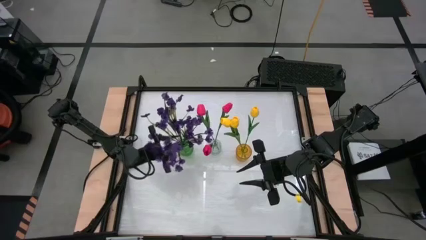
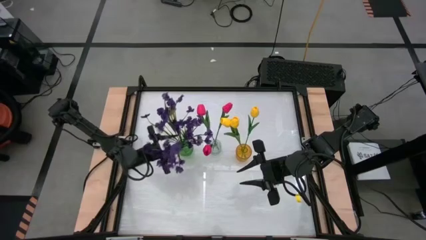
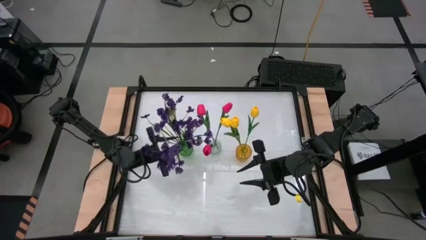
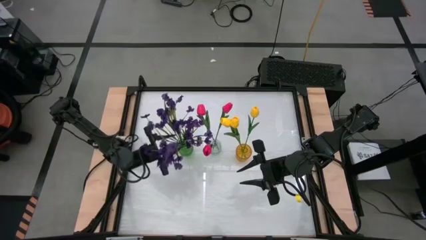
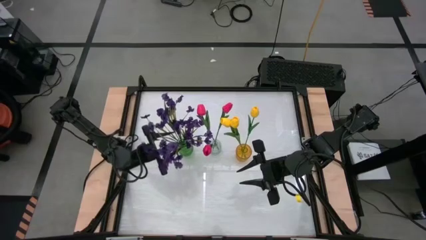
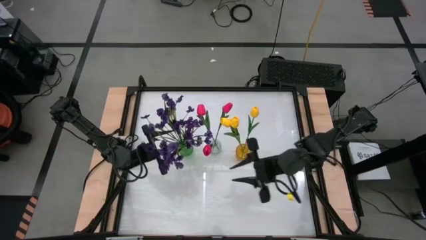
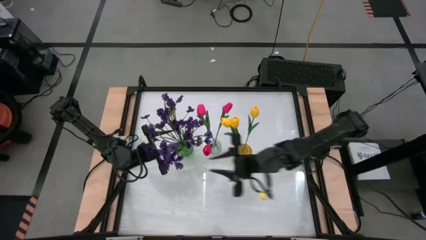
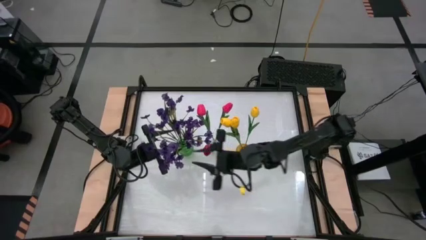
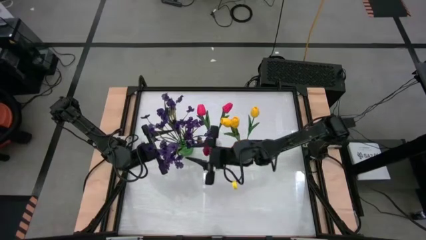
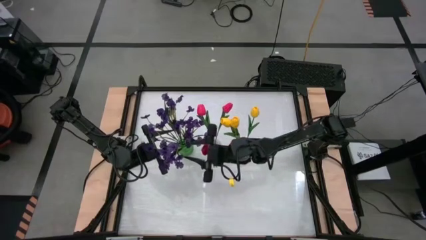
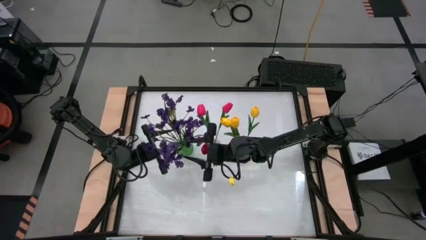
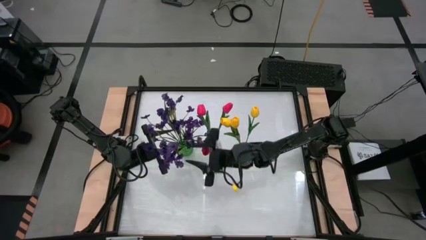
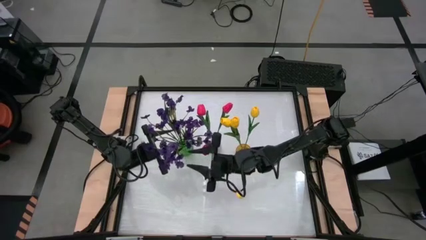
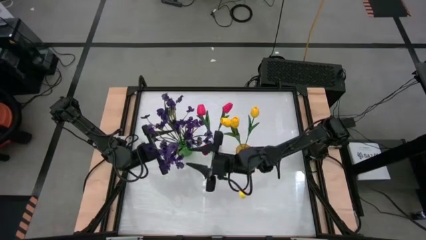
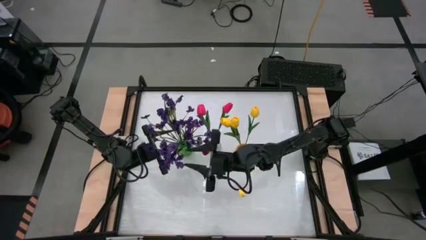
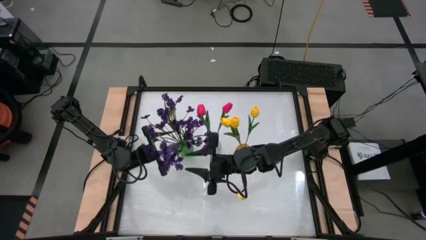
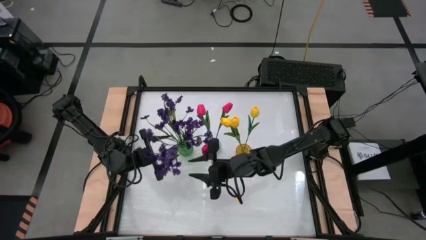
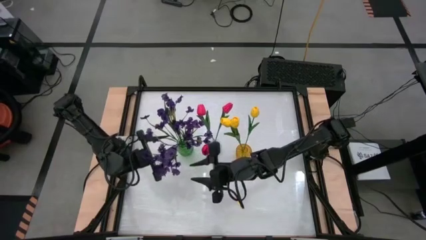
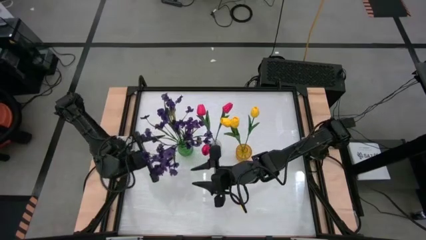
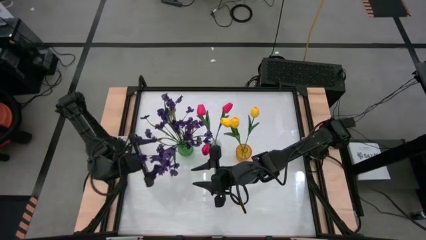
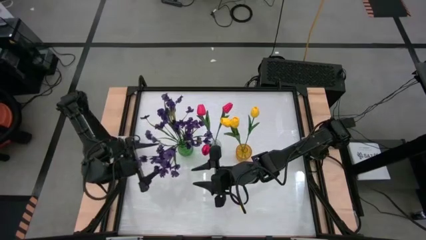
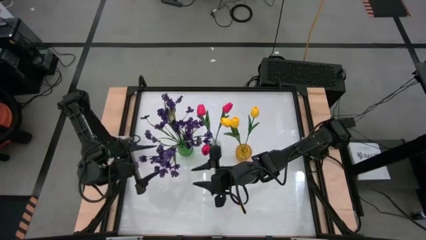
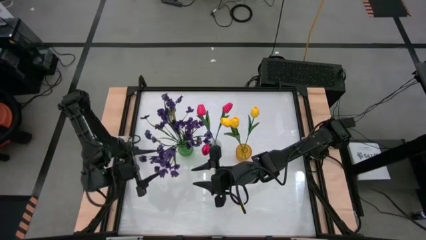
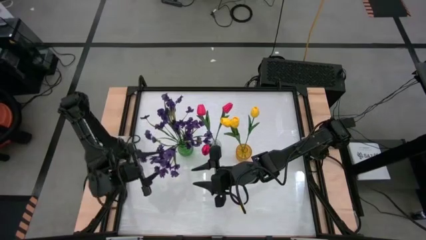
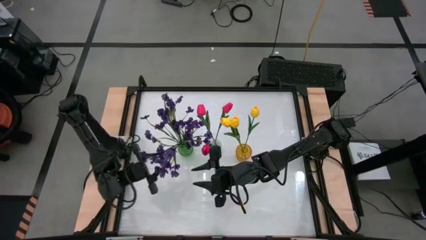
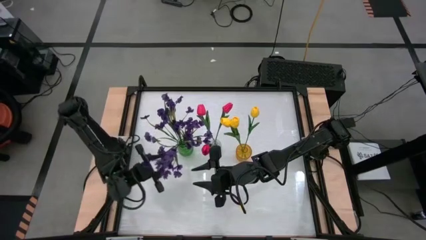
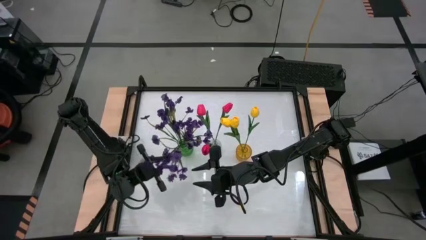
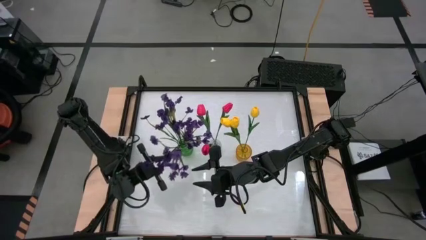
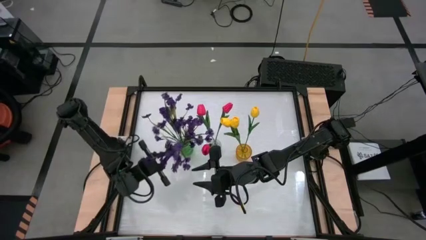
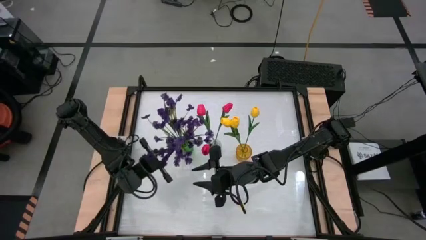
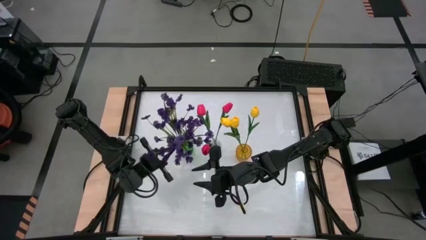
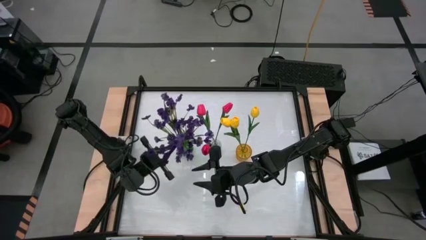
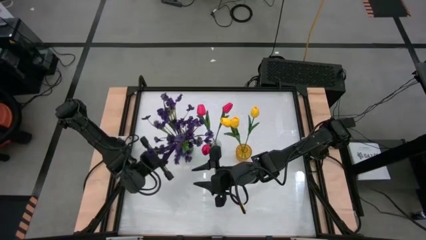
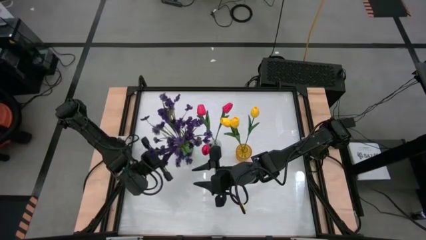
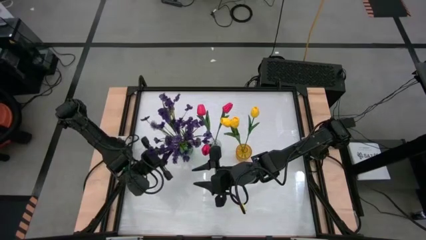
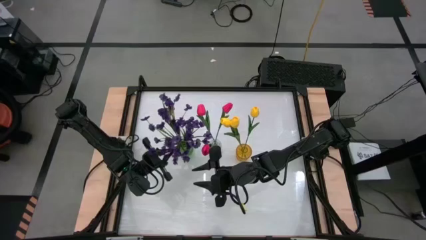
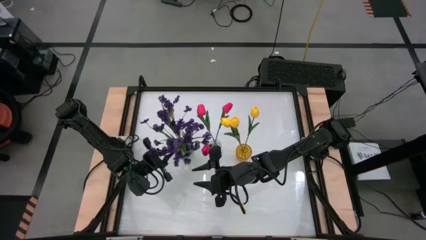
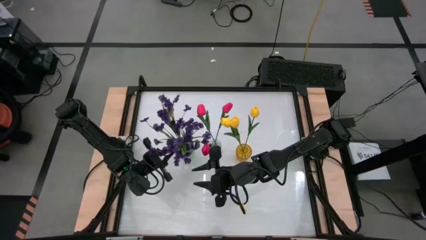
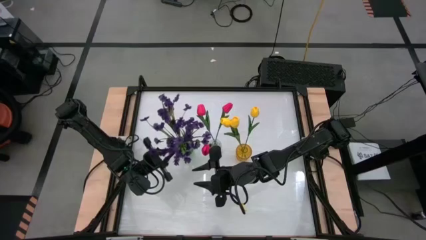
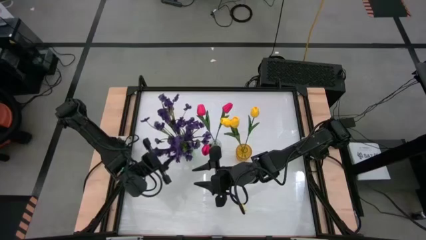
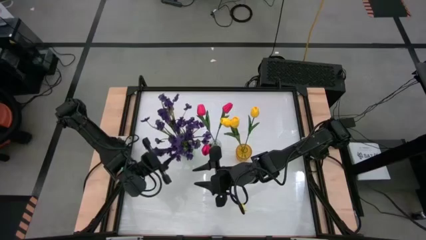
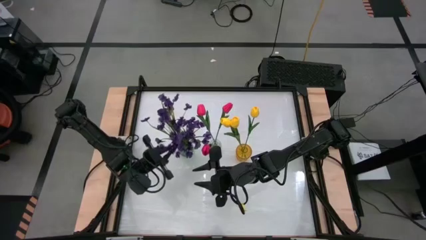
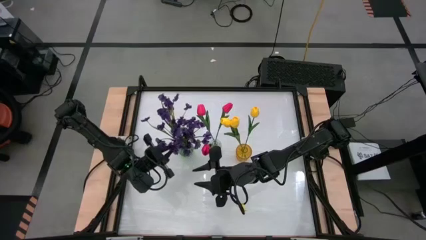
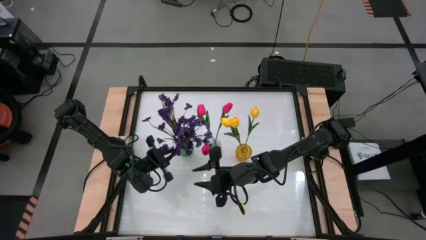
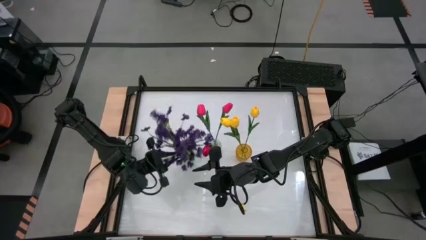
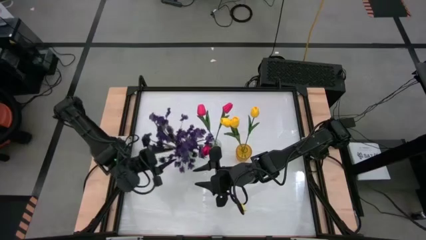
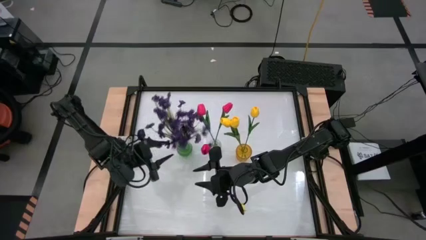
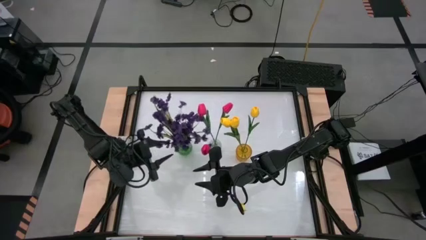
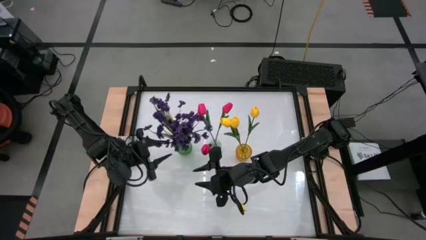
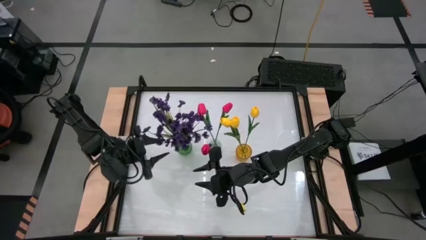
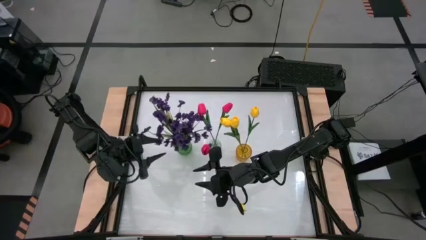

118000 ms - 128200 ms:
Task: Sort flowers into vase by color
Put the purple flowers into the green vase

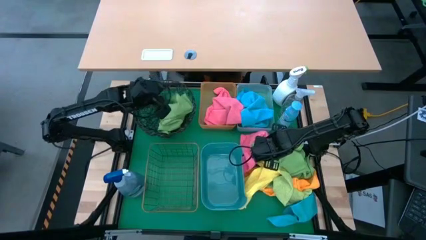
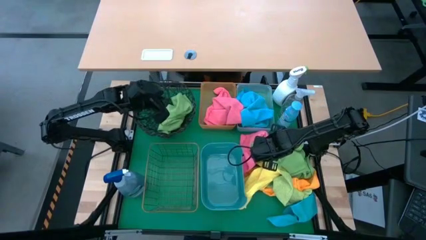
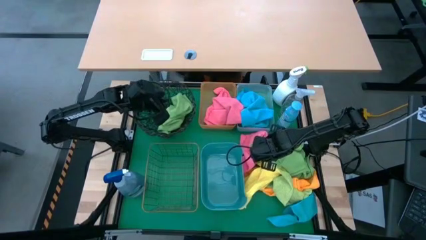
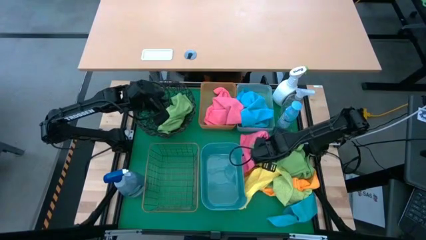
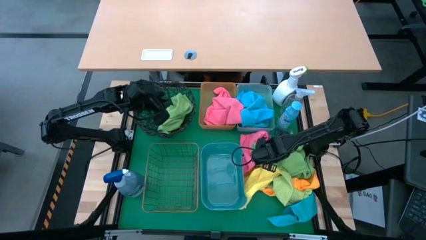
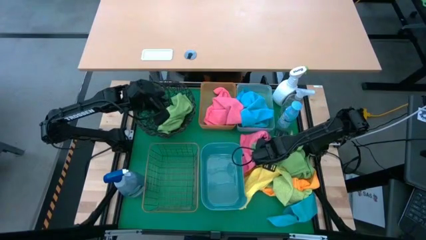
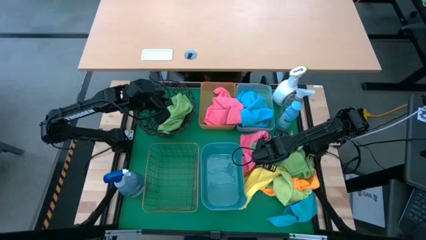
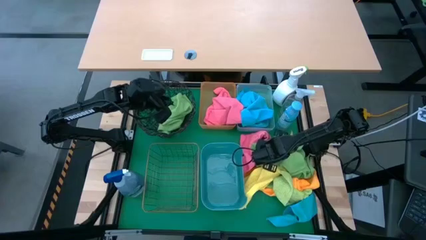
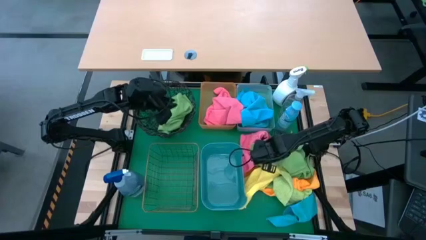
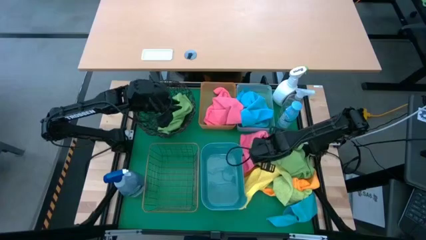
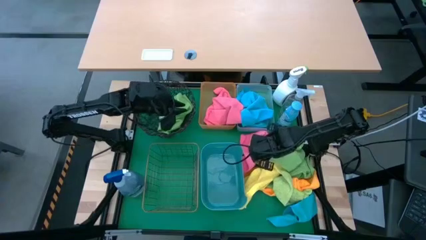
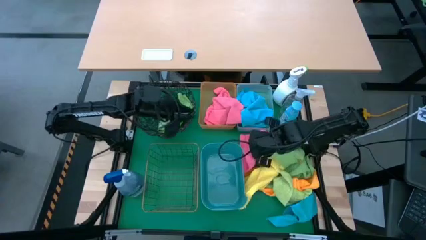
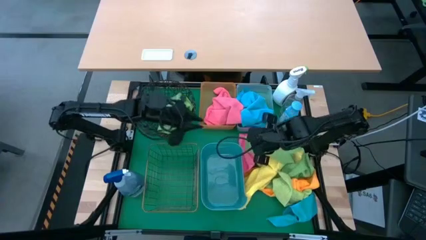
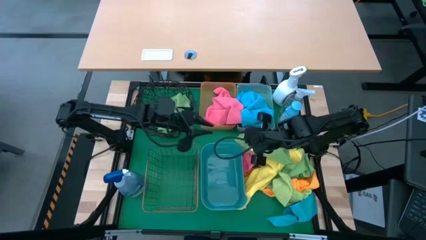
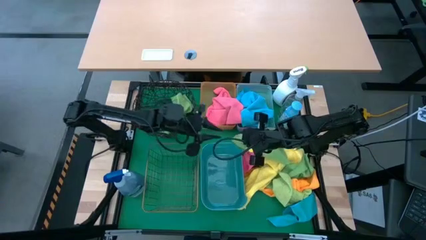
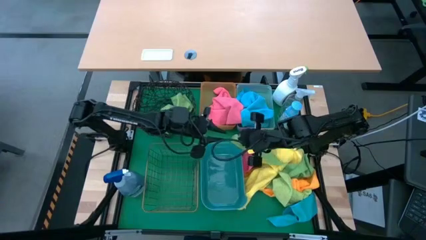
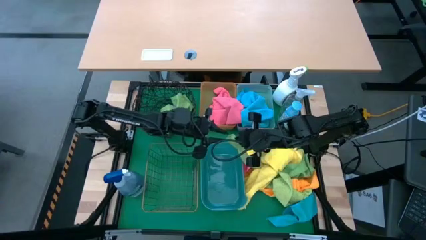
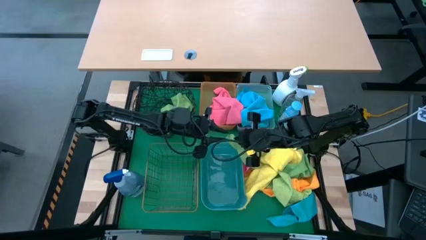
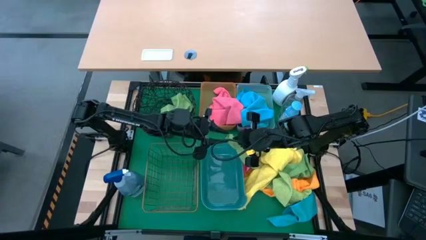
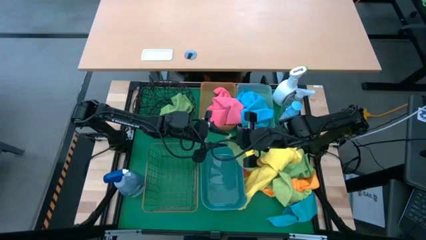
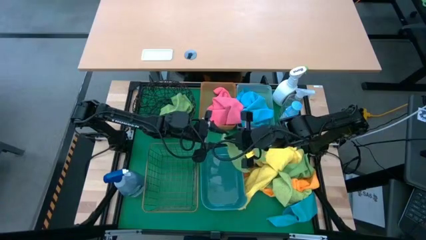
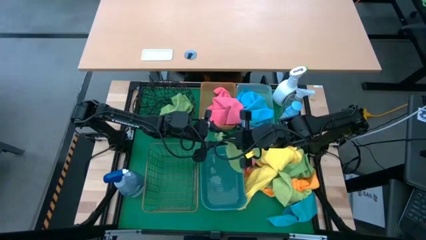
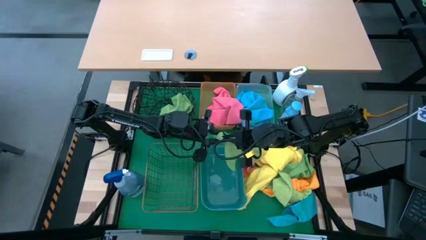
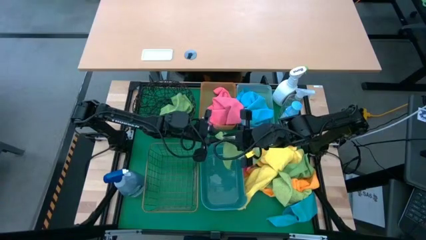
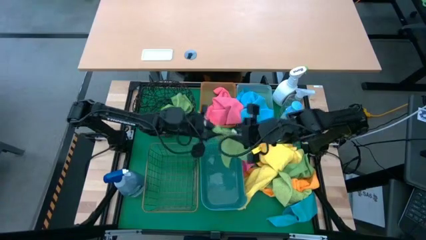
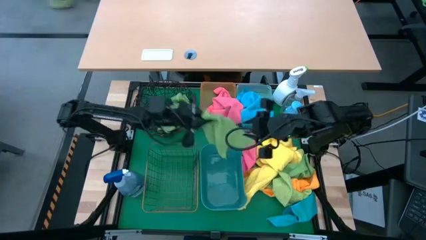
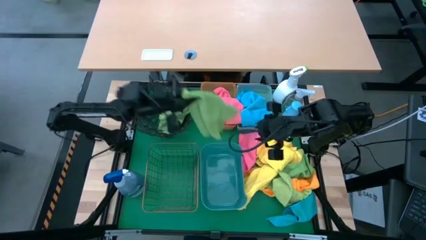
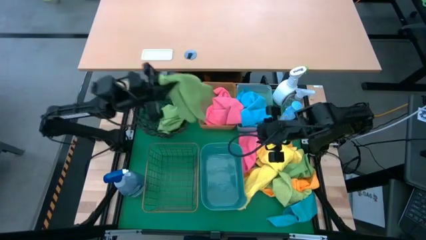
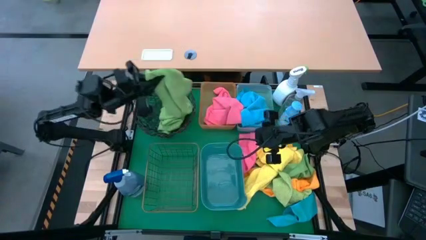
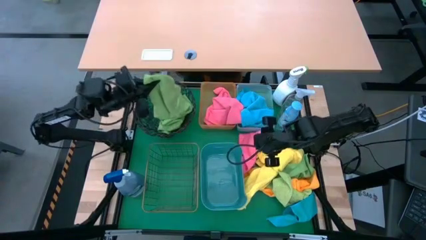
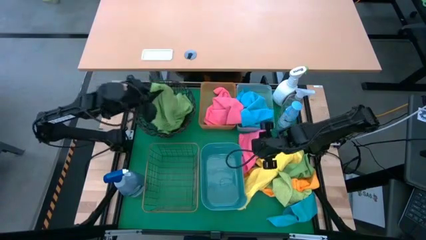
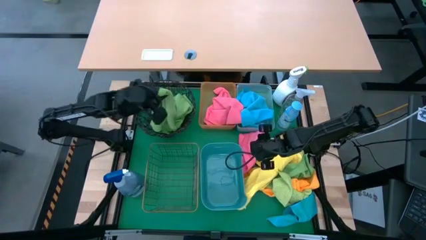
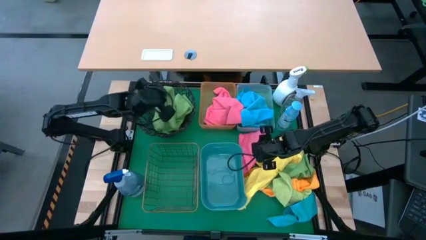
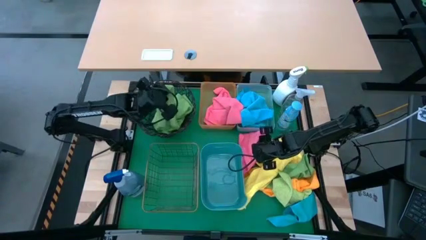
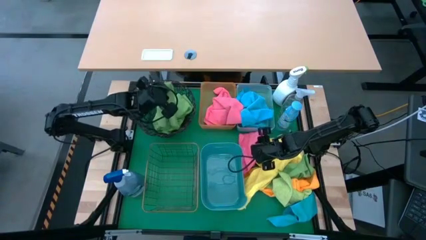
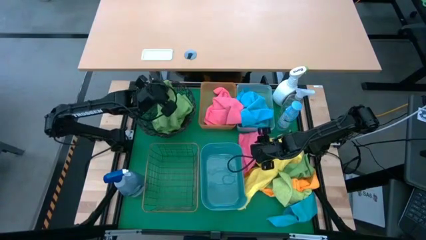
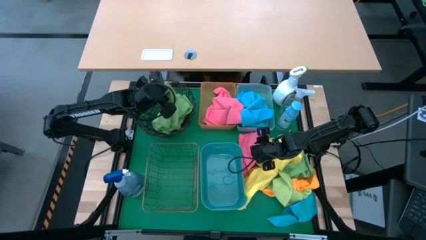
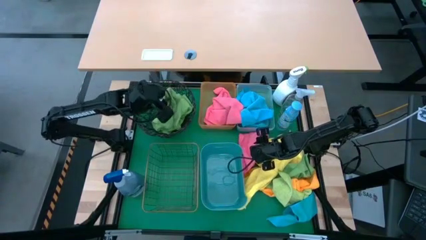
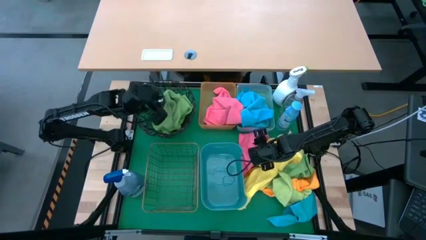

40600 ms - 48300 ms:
Task: Sort microfiber towel by color & place in baskets
Put the green towel into the black basket
